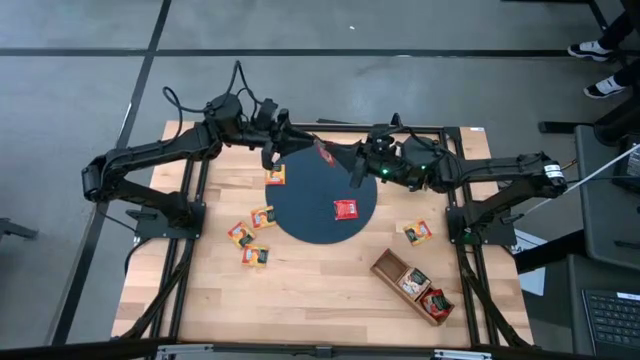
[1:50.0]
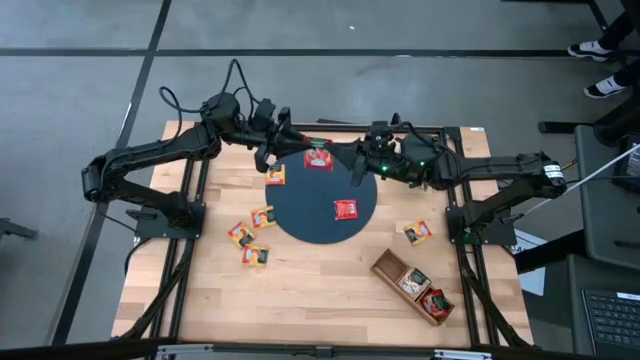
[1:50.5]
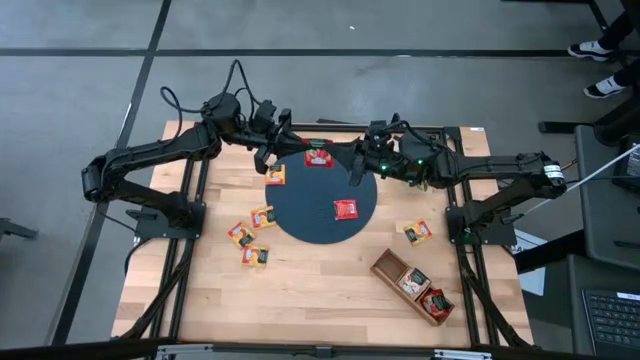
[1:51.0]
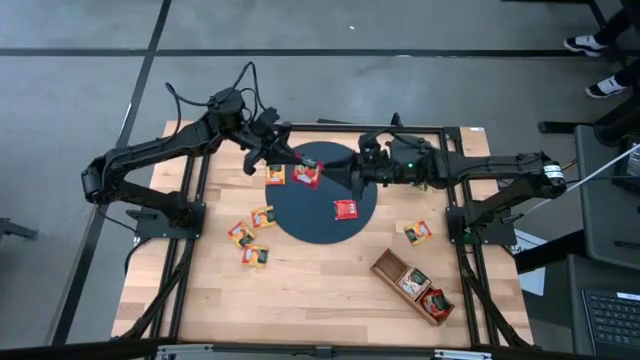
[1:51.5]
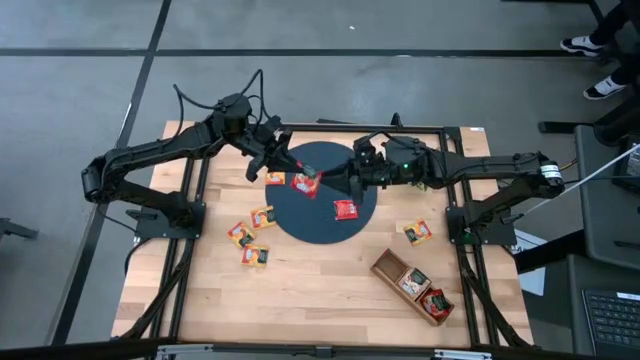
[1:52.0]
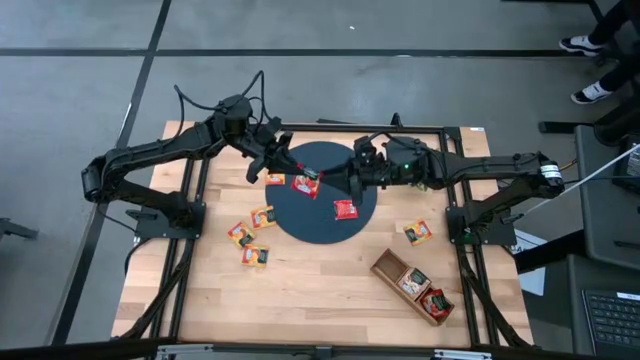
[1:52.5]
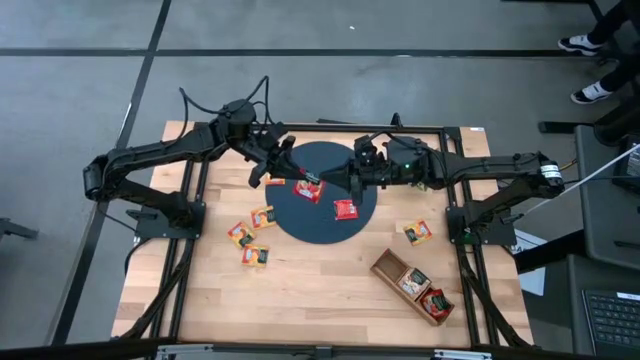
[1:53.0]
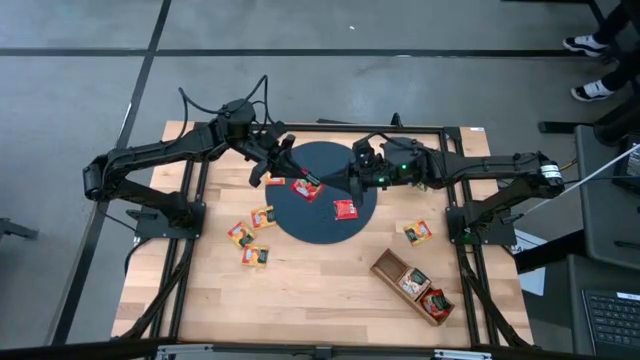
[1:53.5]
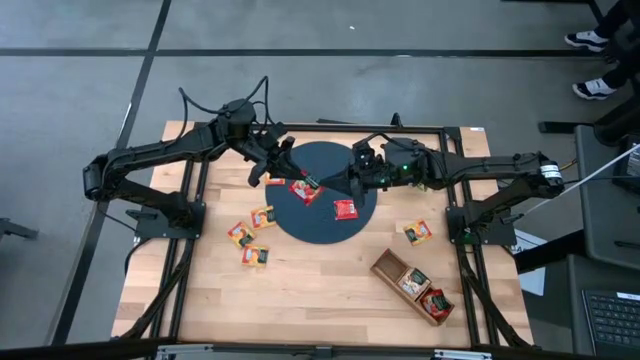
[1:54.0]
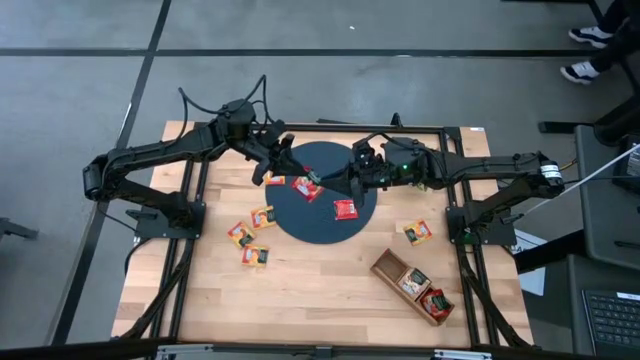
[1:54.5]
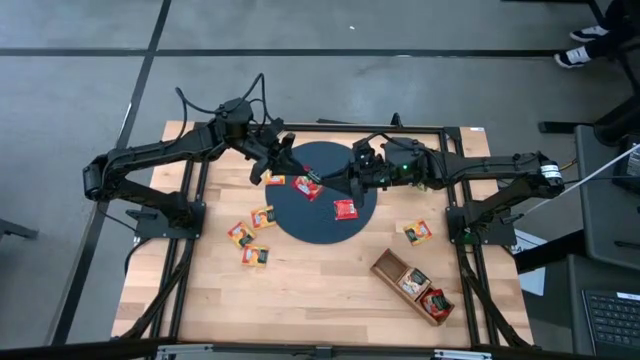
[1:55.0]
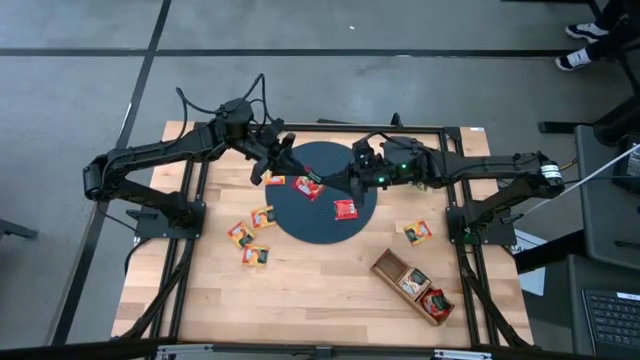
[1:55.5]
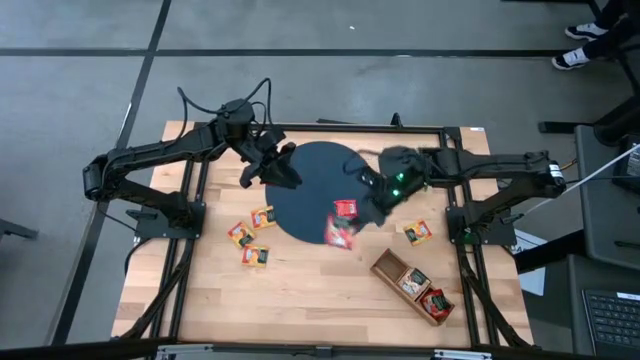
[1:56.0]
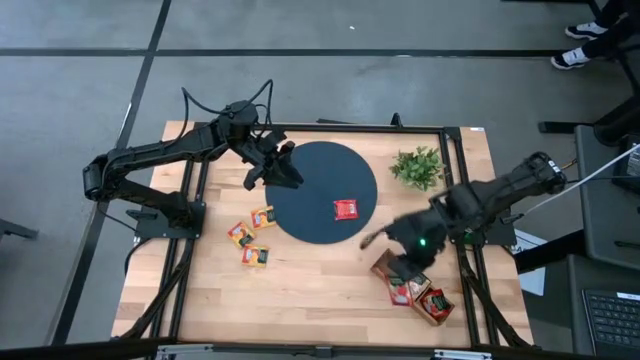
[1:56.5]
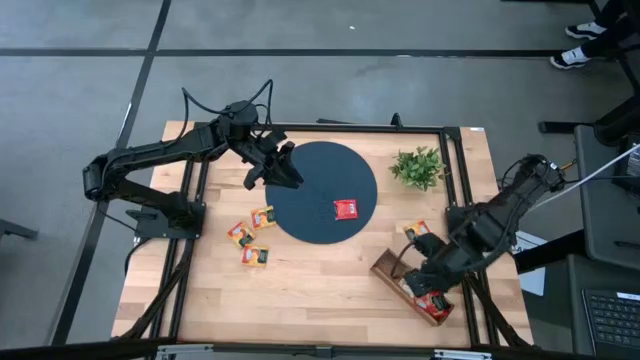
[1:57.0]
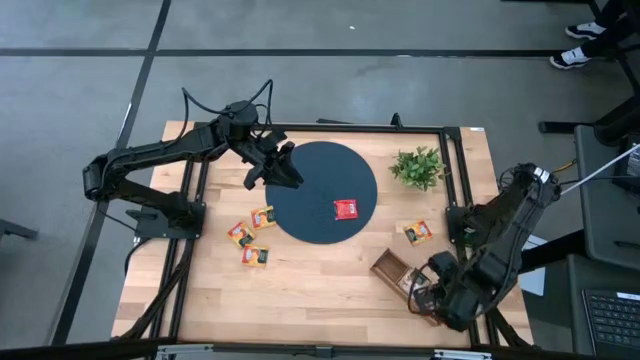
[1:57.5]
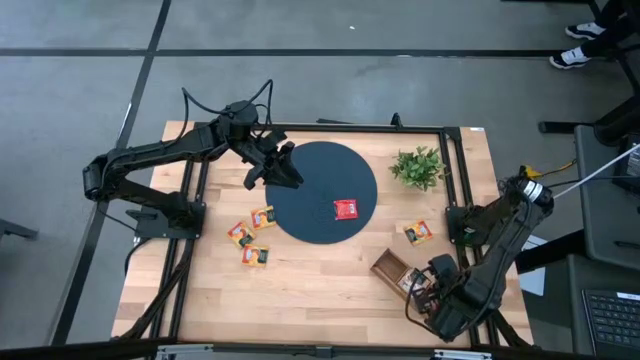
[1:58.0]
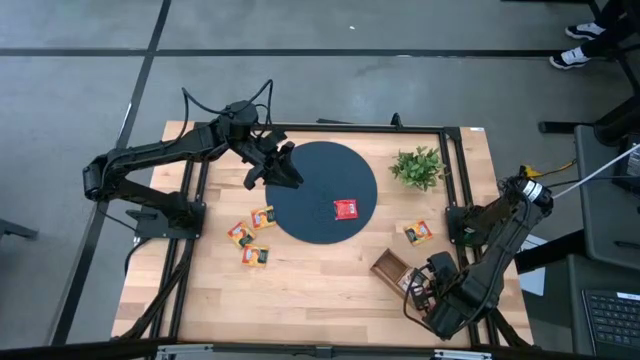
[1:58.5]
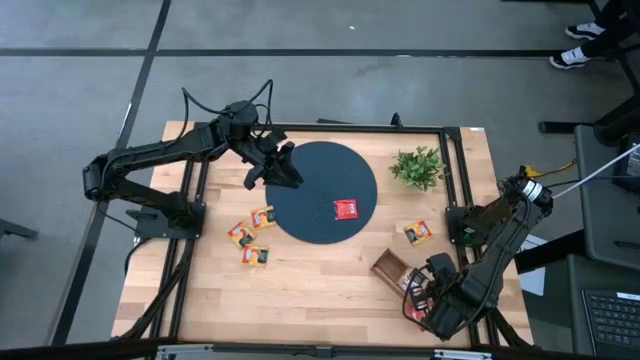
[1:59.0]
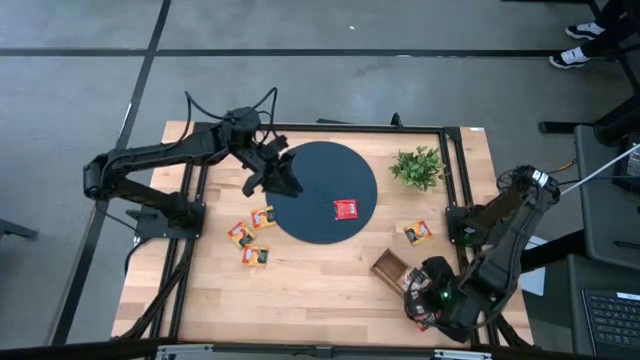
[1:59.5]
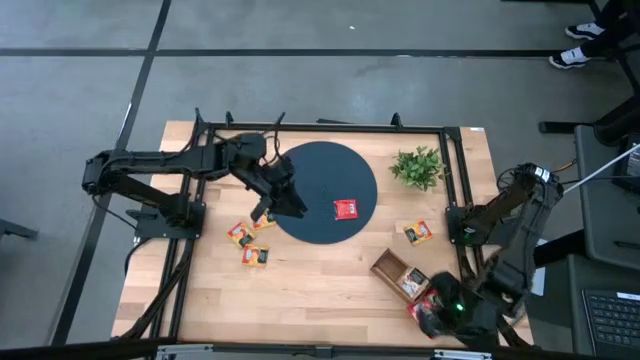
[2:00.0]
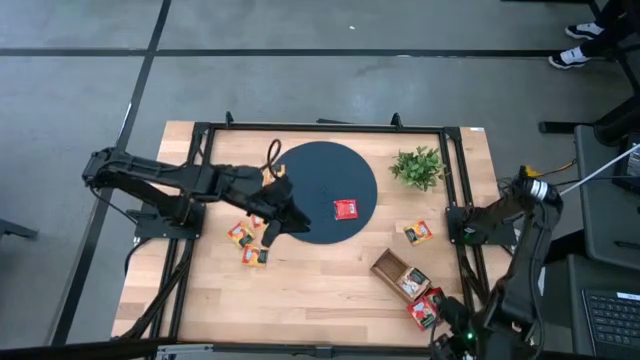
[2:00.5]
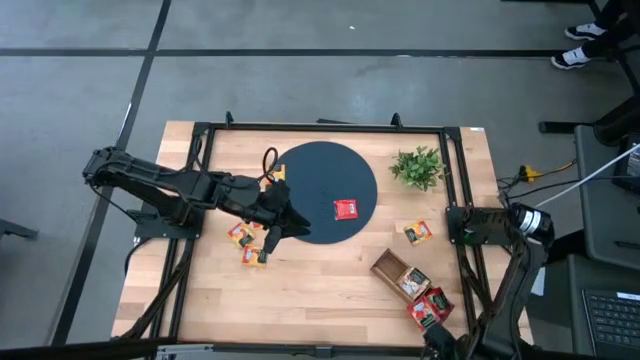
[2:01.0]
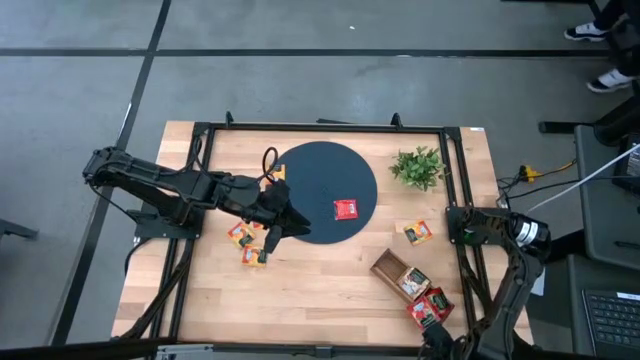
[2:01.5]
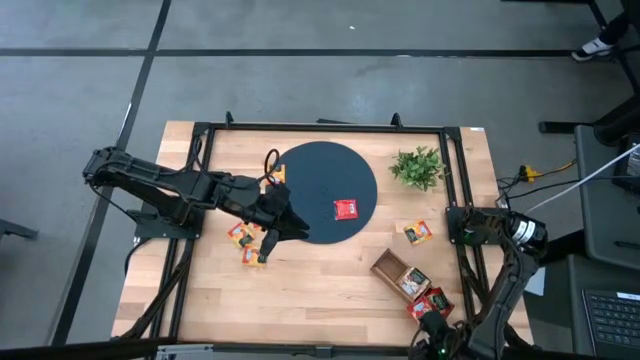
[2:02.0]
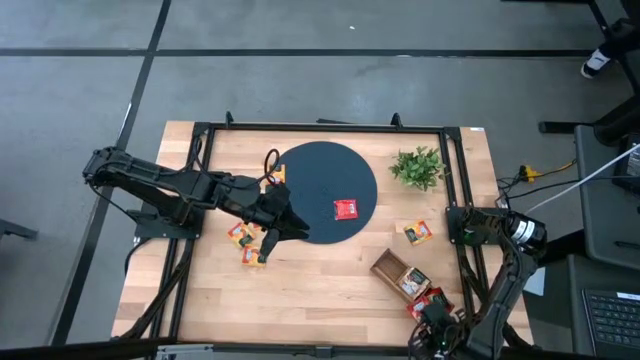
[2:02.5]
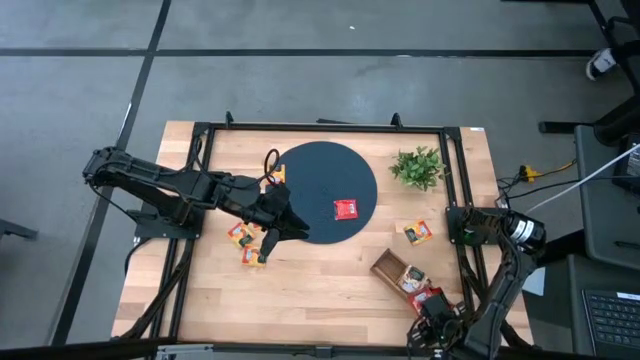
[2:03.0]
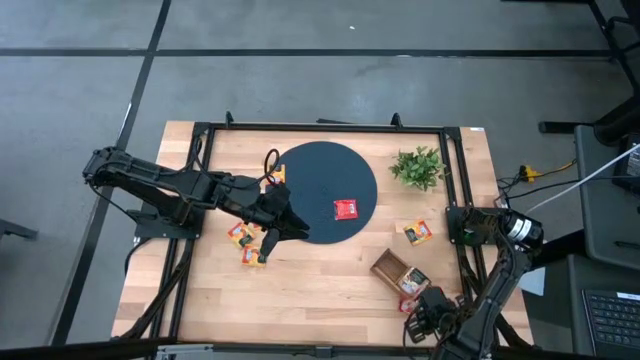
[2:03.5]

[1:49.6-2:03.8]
Task: Pick & Place Tea
Put the red tea bag into the right section of the wooden organizer

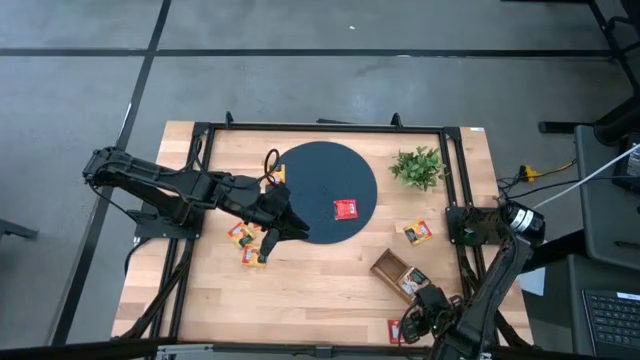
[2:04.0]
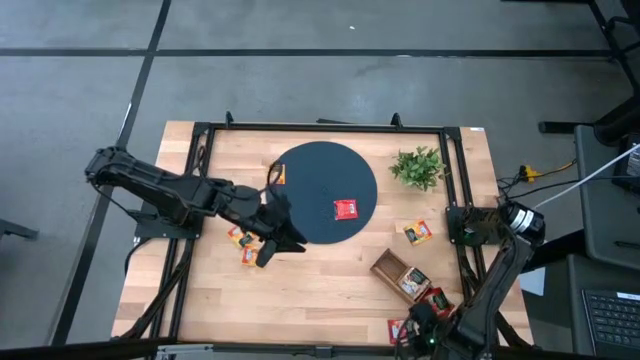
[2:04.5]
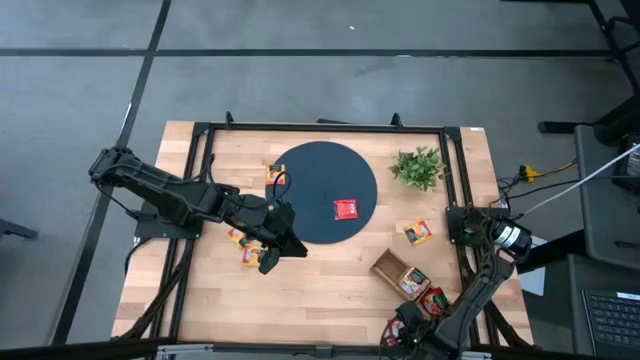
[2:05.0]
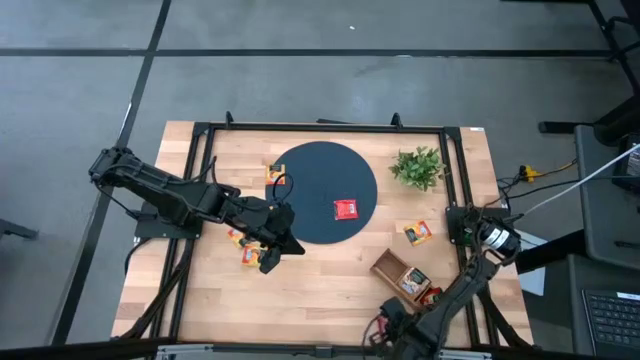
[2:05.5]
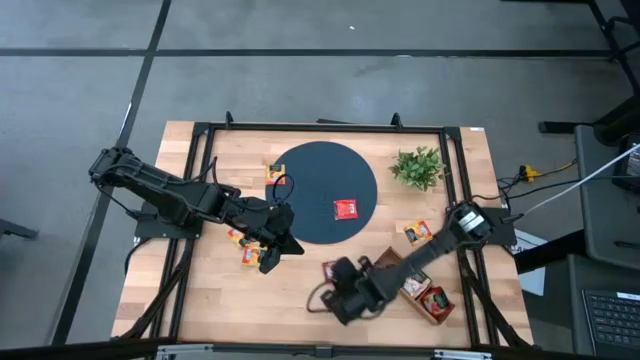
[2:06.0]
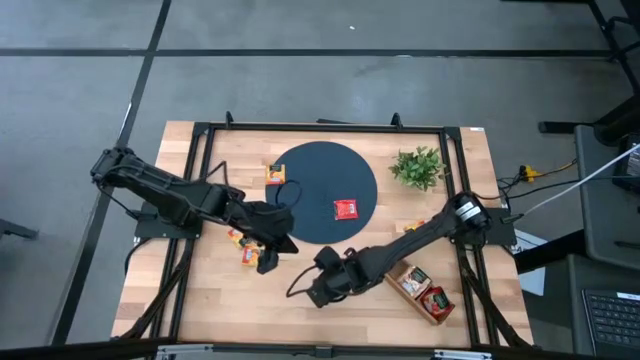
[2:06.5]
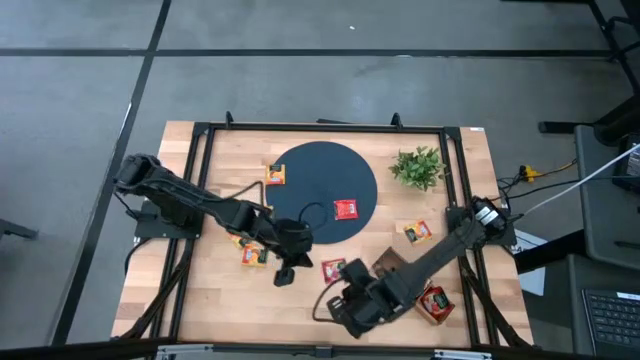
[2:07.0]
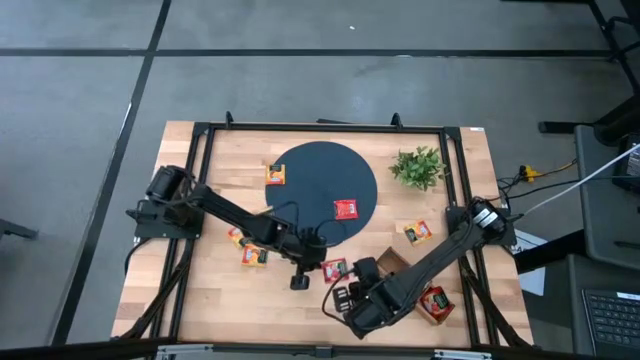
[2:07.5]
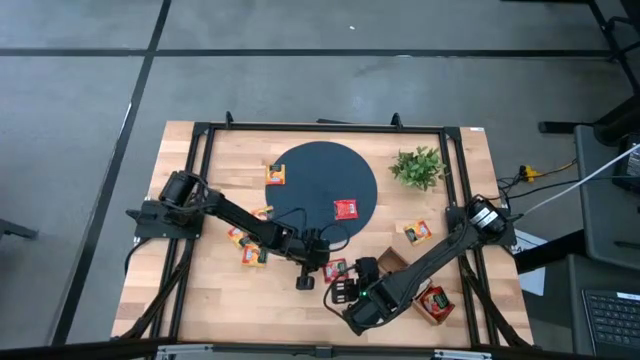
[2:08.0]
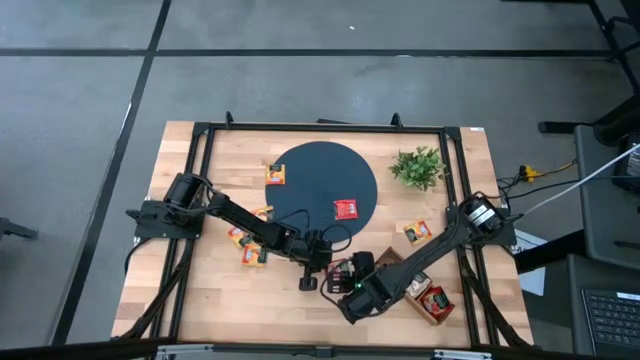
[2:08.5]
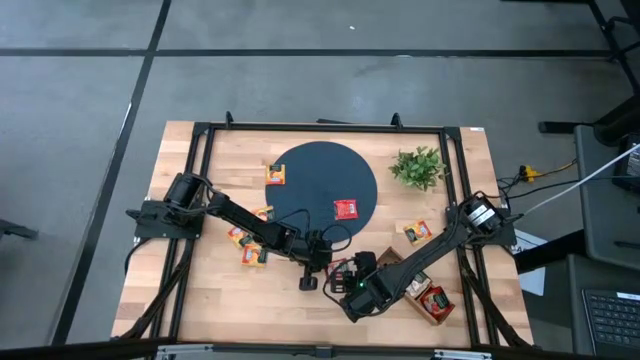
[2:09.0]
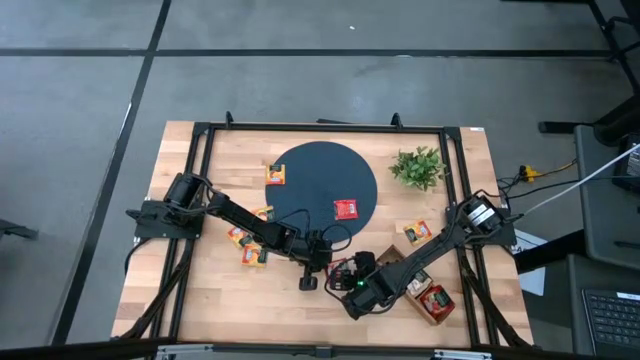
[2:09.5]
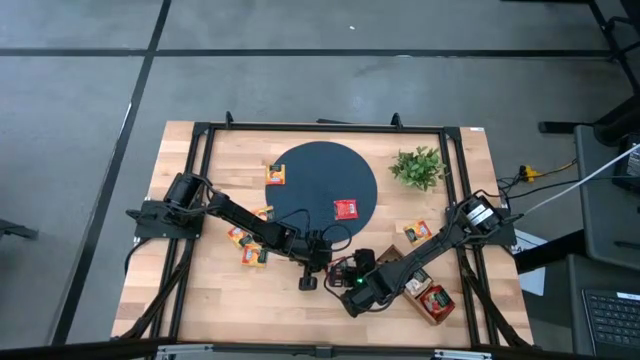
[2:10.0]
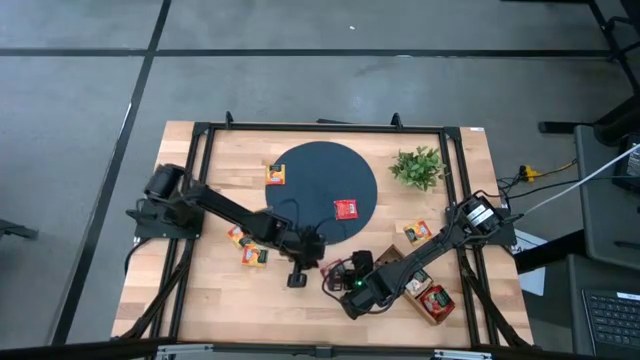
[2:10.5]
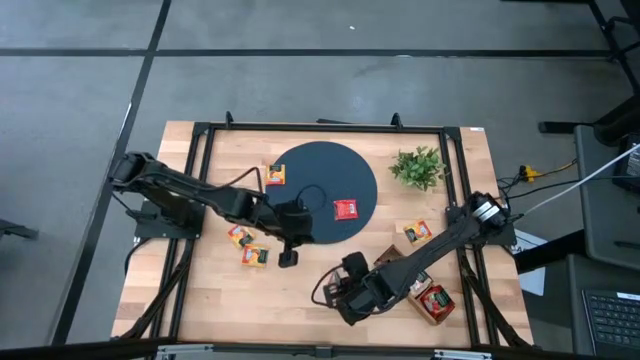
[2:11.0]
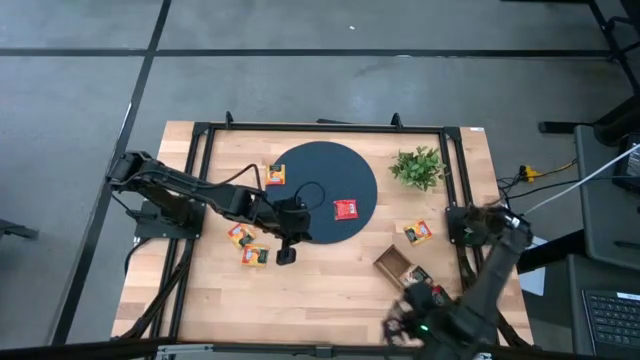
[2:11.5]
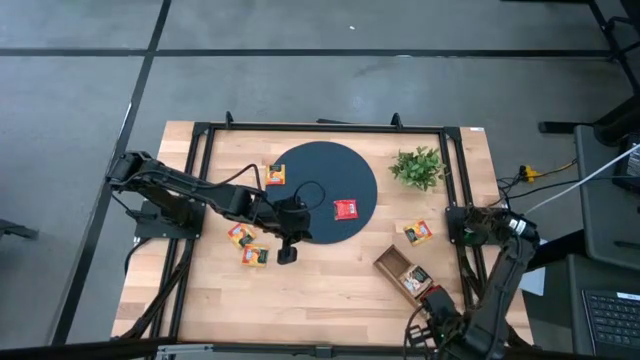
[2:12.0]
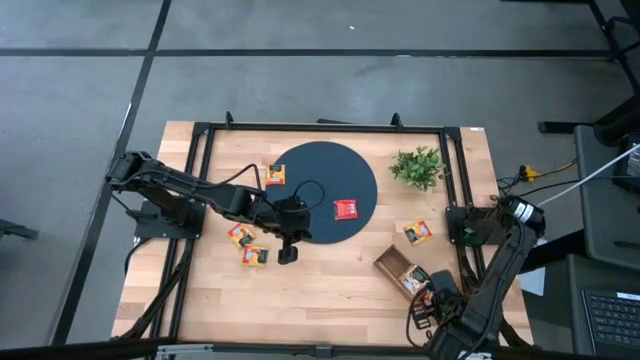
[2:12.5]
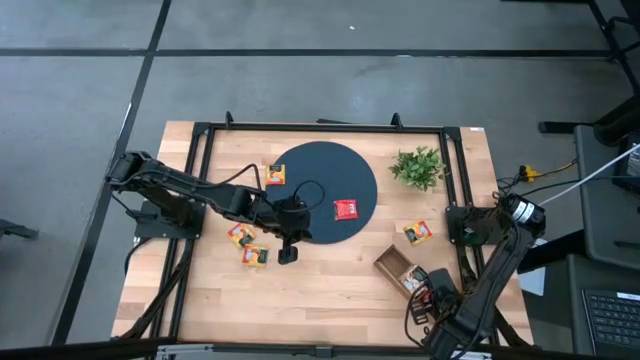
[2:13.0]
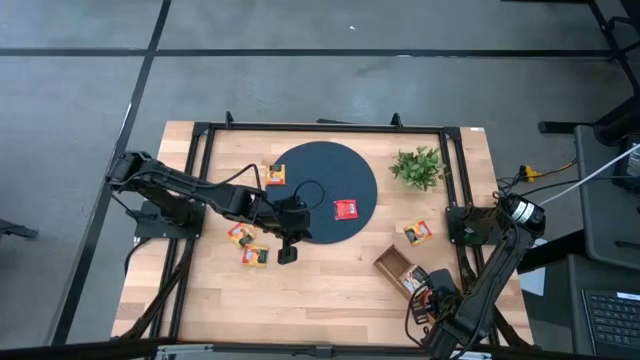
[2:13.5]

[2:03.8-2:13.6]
Put the red tea bag into the right section of the wooden organizer
